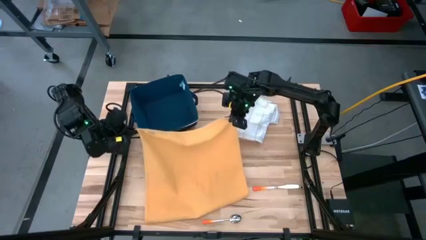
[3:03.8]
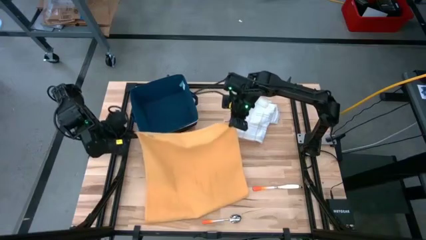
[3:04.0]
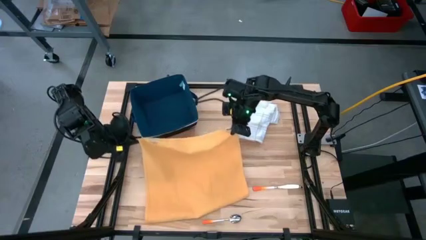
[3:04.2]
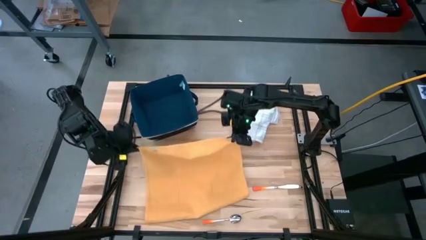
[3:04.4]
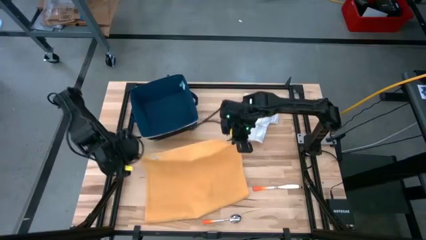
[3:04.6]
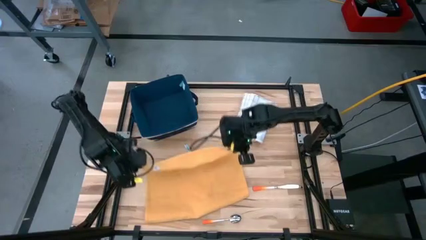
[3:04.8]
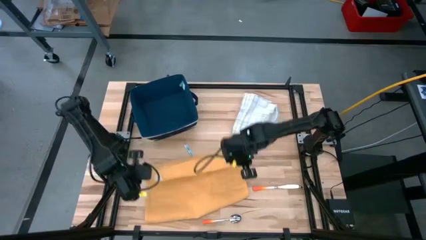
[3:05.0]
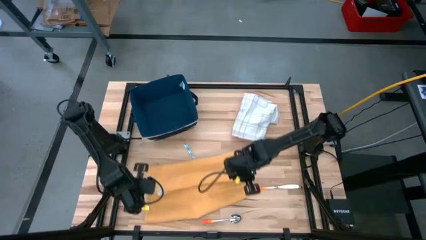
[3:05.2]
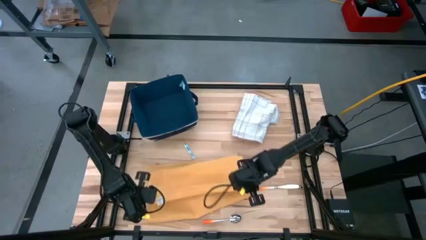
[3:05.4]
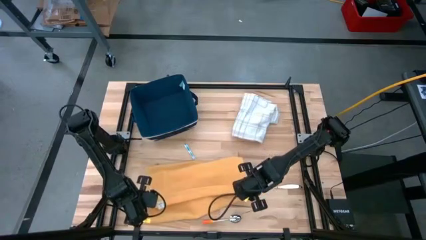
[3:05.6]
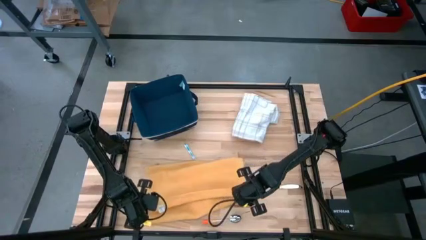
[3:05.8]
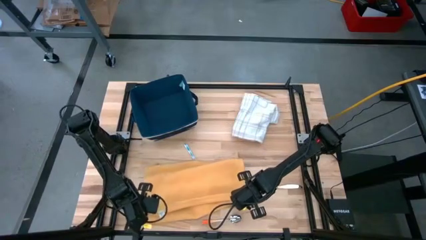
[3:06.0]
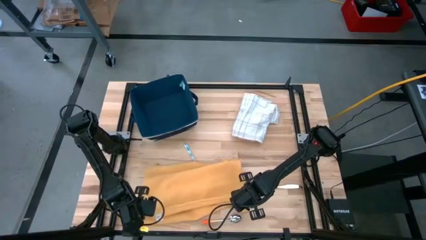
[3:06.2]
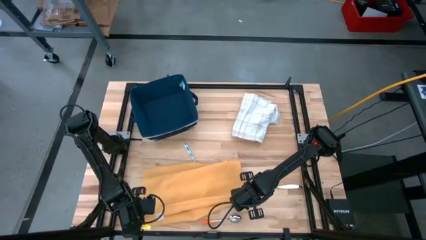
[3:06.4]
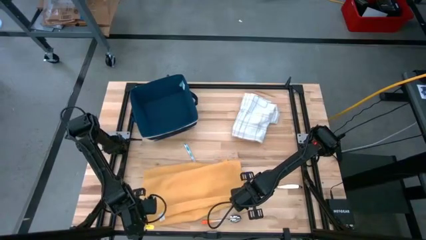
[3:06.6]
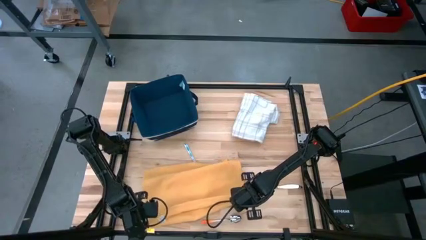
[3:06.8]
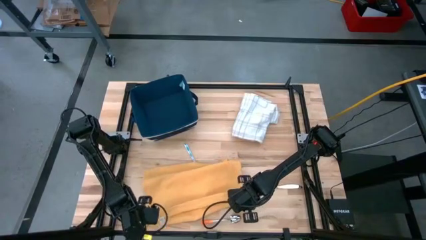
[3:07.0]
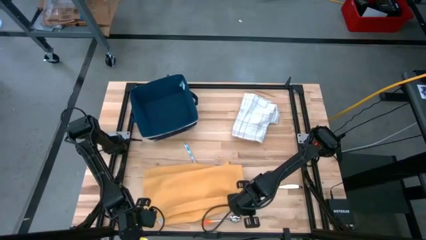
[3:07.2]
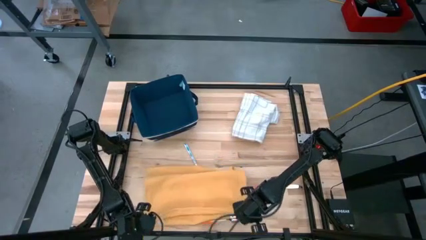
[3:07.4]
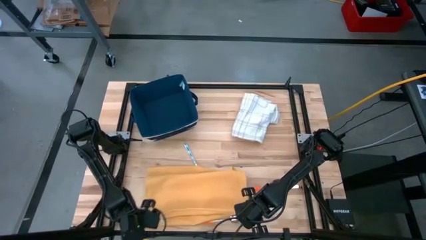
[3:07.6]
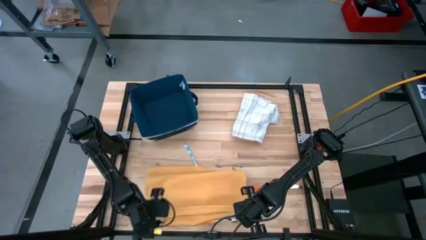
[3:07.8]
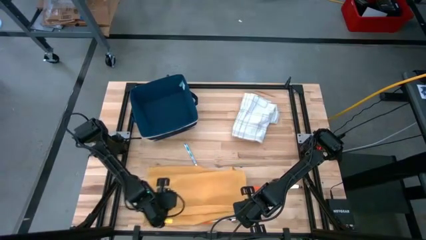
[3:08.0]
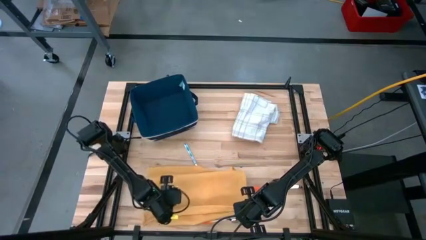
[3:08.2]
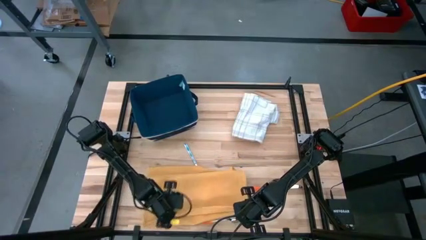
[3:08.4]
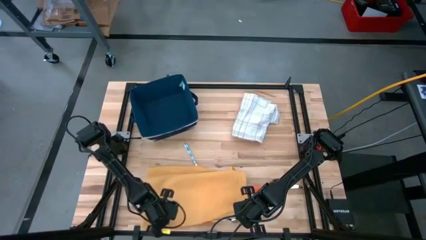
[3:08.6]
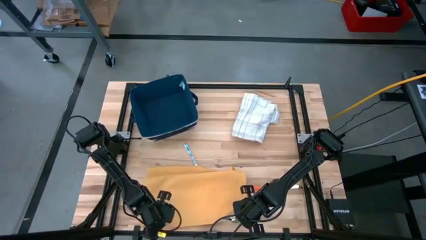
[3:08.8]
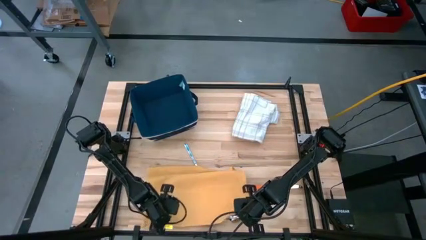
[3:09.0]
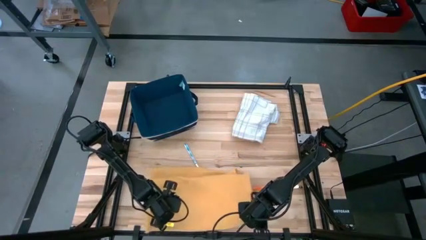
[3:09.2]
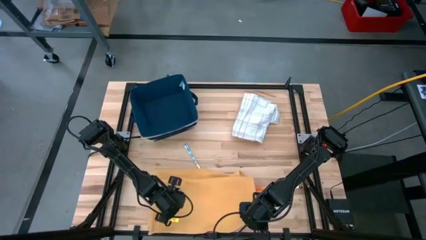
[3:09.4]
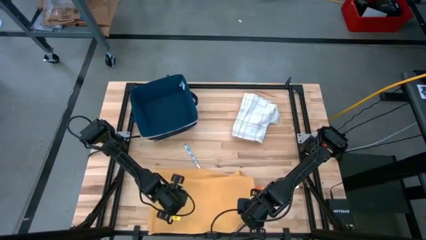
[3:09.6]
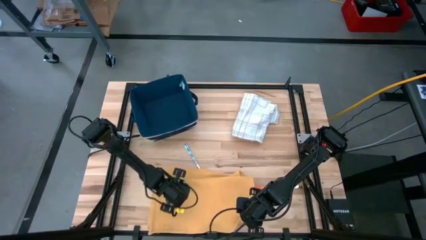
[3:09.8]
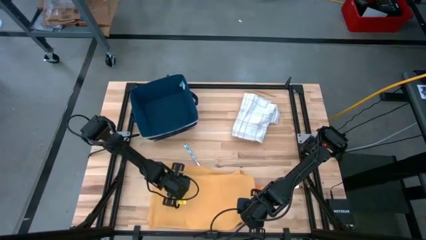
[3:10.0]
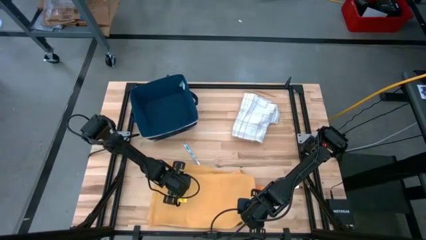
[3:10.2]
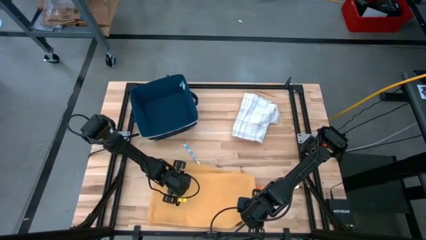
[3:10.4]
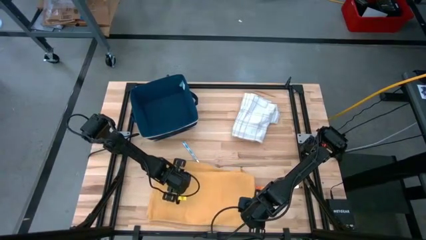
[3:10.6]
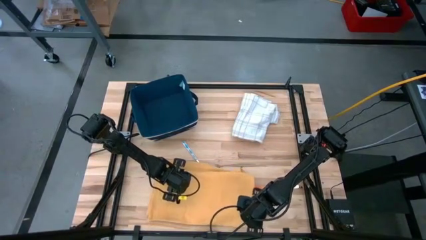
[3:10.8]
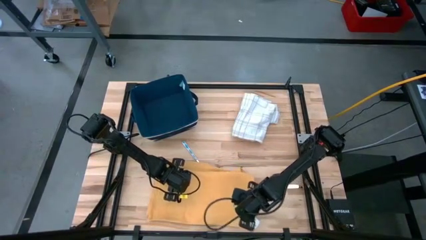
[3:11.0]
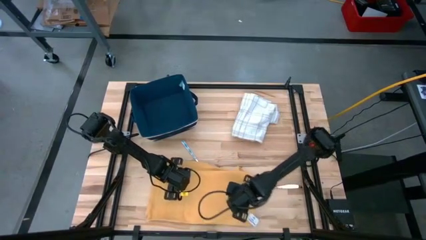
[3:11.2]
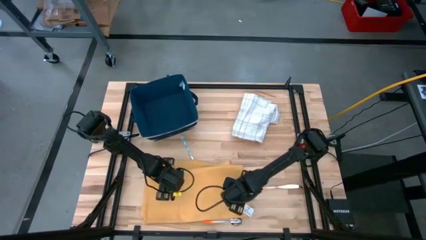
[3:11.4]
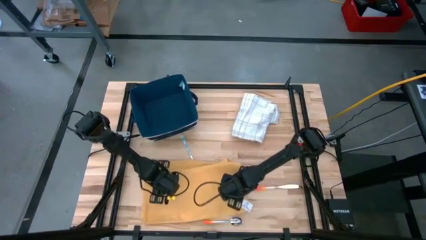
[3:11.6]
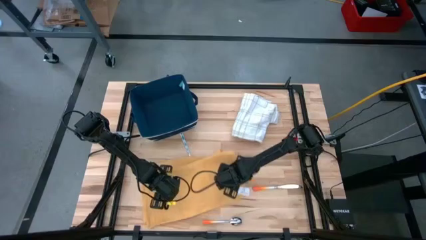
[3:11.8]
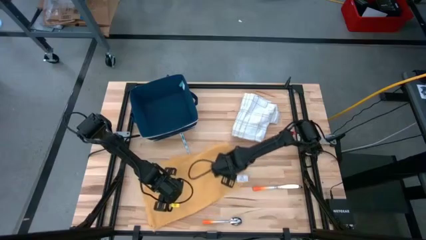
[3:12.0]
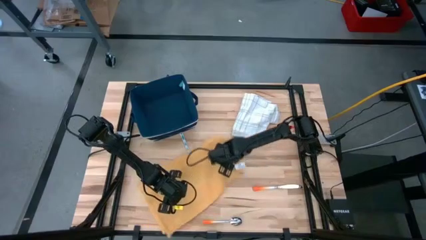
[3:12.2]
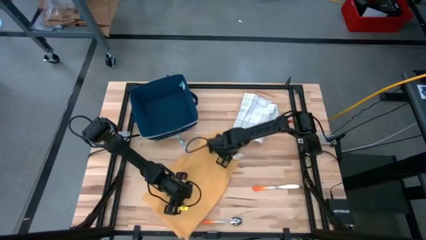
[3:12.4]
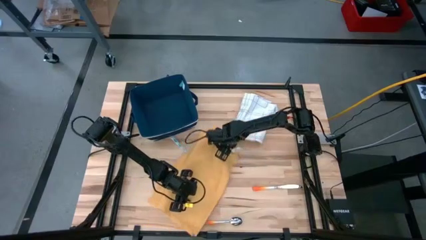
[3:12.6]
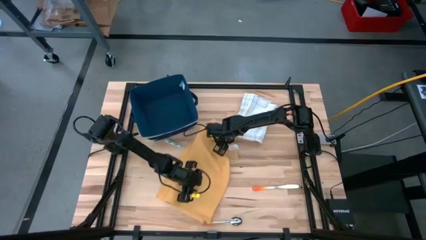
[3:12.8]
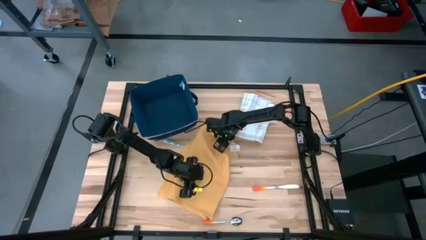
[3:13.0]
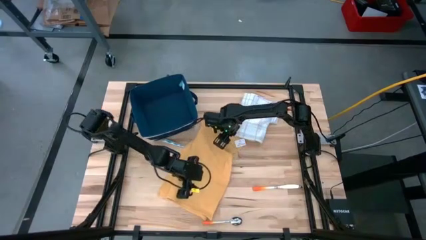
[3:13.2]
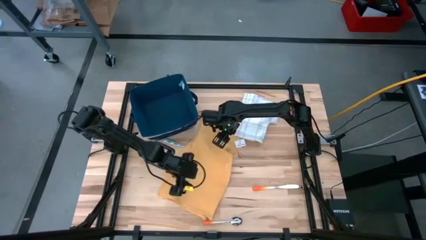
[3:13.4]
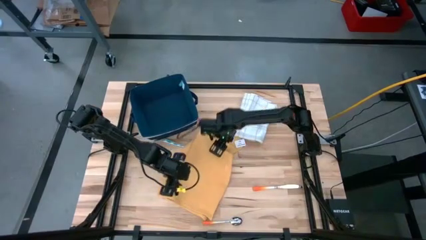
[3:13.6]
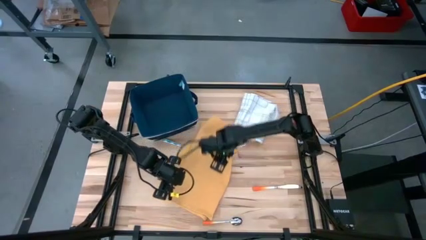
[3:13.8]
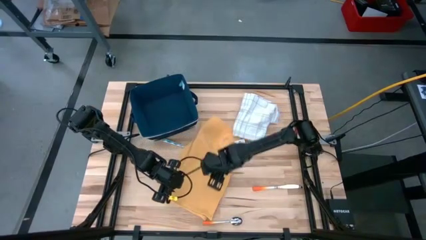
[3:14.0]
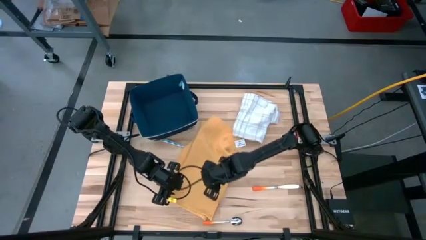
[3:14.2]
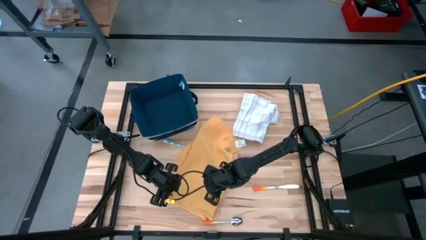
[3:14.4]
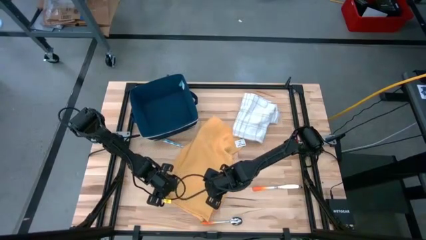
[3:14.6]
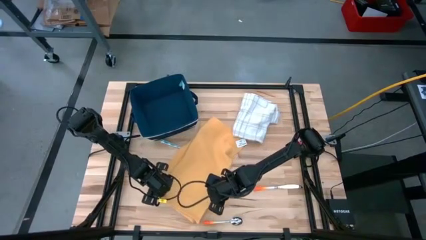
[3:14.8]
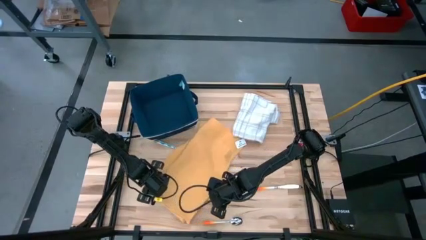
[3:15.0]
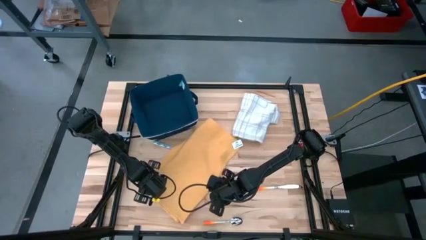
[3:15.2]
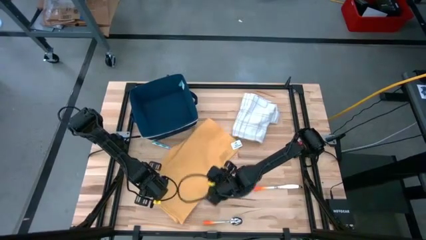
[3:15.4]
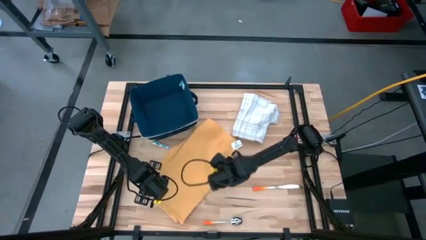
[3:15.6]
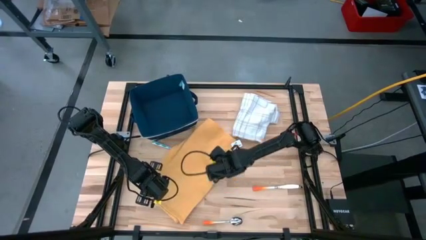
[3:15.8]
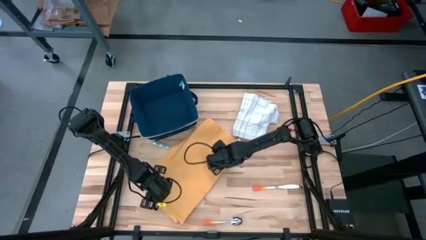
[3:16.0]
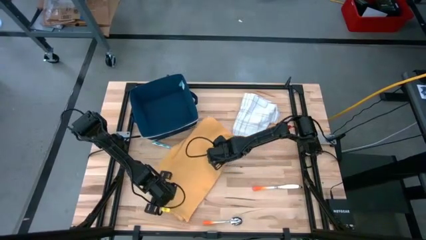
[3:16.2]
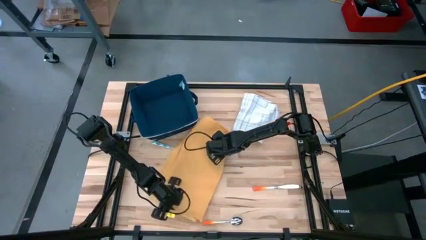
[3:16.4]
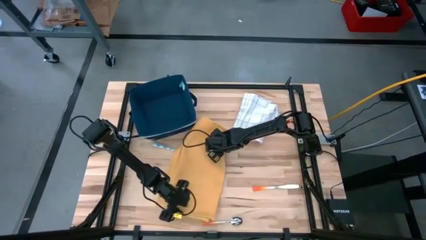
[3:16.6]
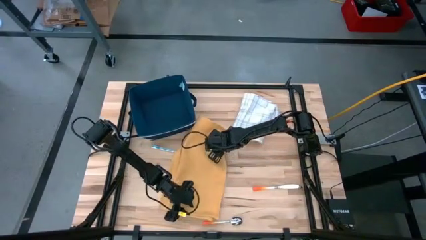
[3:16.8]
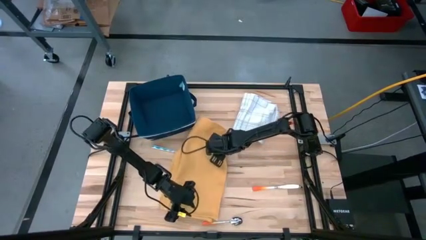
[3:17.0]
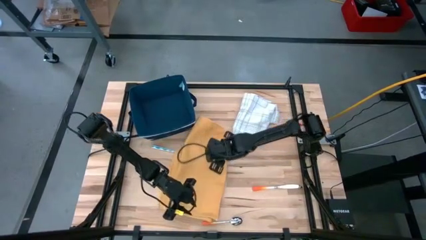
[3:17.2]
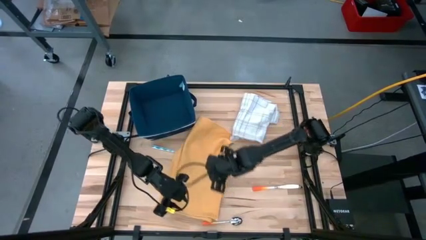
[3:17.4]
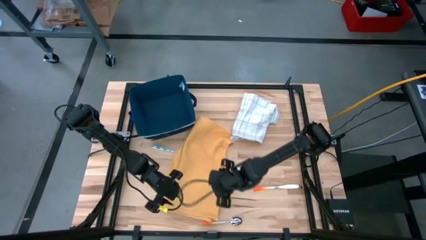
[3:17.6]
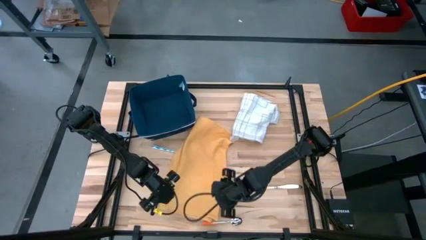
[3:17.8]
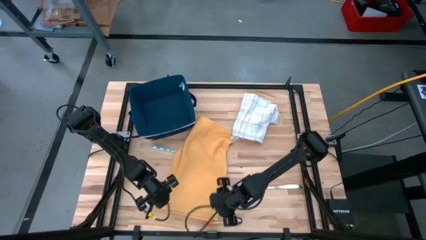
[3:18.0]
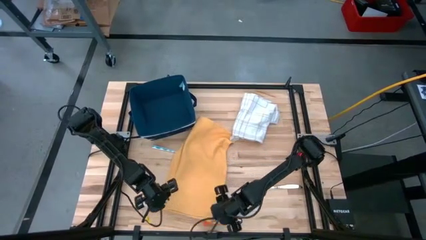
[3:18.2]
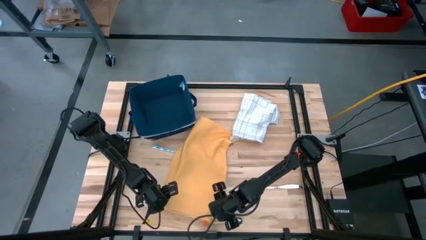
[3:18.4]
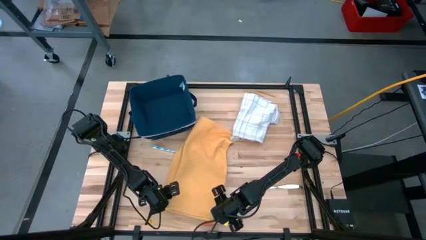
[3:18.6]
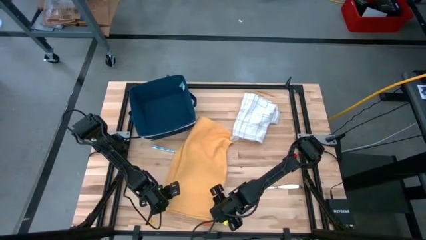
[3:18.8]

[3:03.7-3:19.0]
Task: Fold towel
Fold the yellow towel
